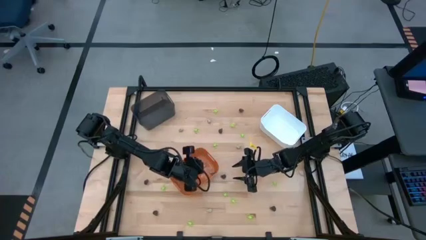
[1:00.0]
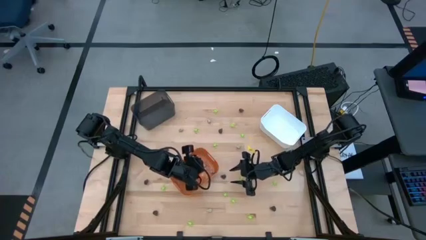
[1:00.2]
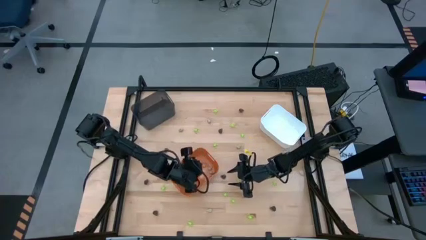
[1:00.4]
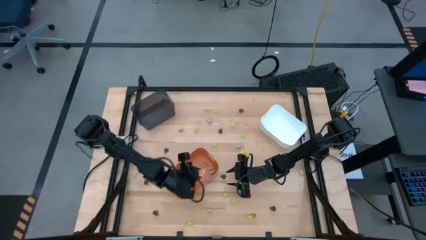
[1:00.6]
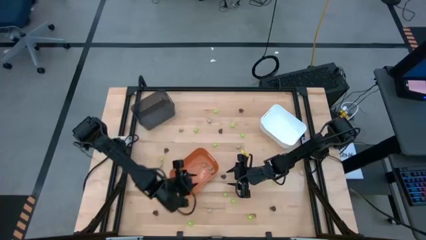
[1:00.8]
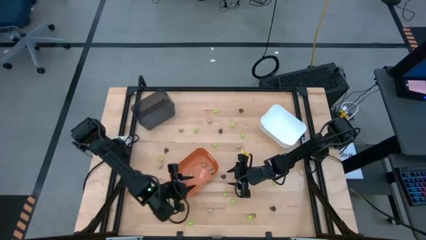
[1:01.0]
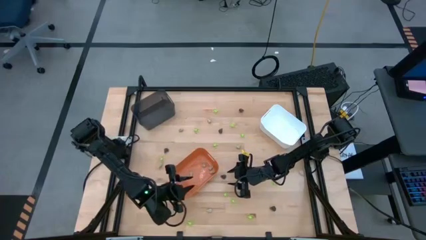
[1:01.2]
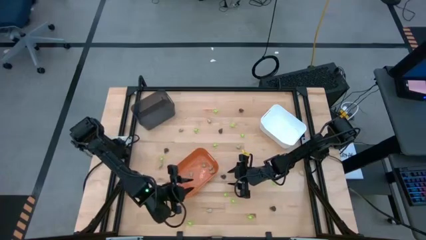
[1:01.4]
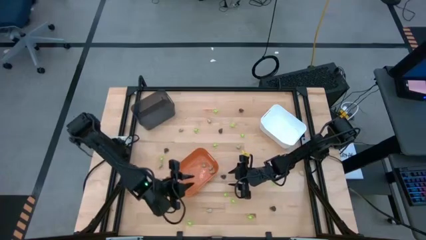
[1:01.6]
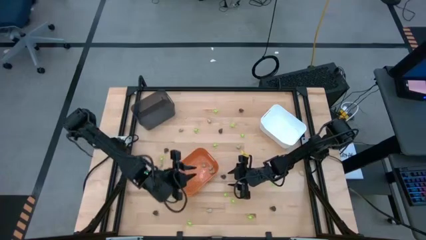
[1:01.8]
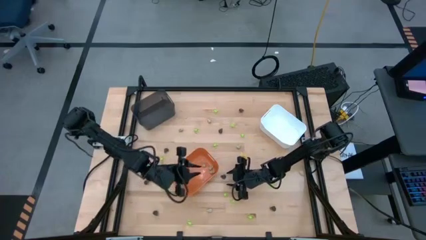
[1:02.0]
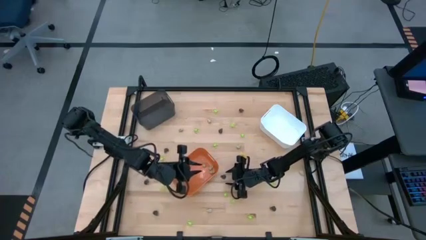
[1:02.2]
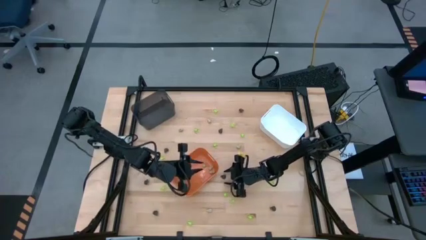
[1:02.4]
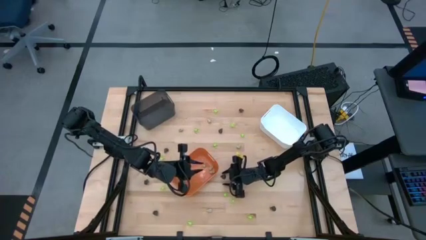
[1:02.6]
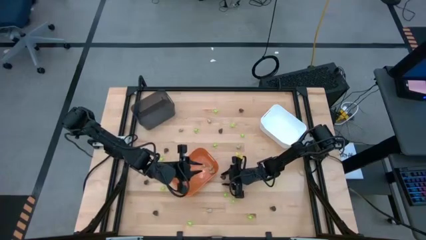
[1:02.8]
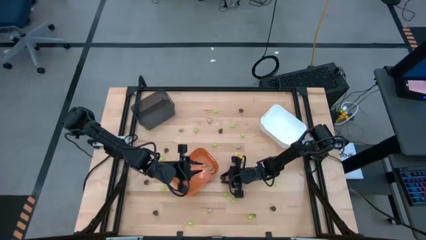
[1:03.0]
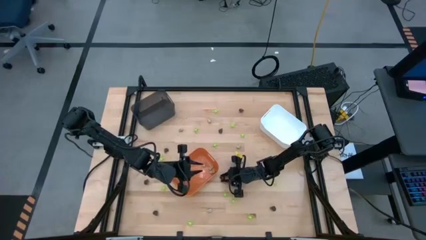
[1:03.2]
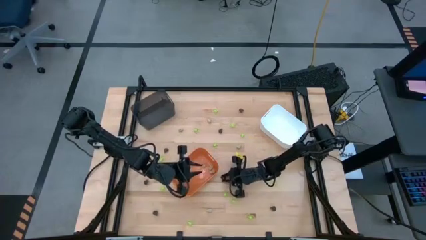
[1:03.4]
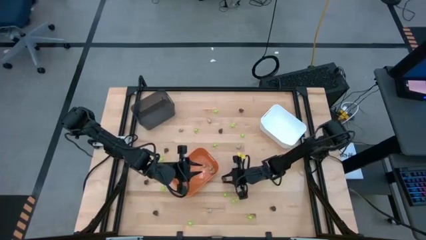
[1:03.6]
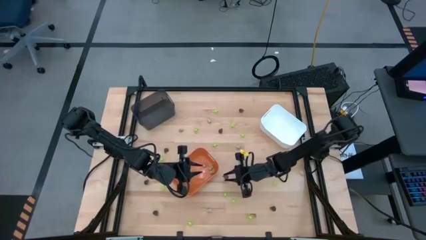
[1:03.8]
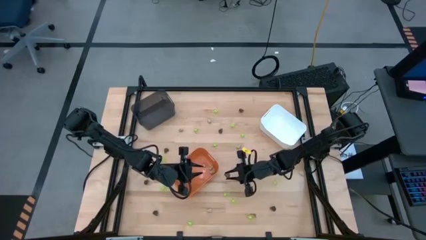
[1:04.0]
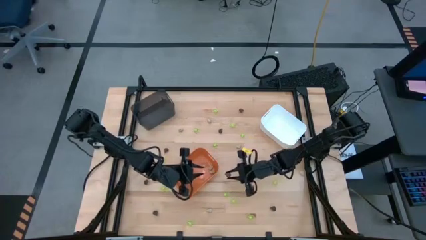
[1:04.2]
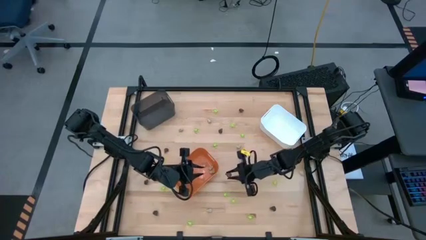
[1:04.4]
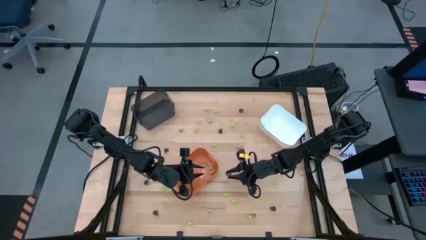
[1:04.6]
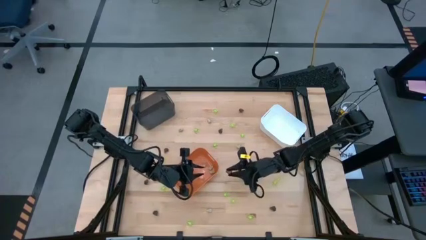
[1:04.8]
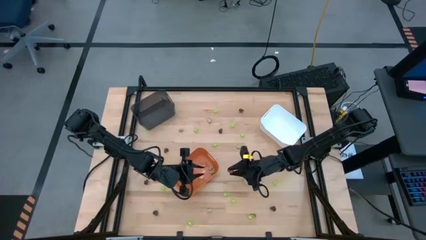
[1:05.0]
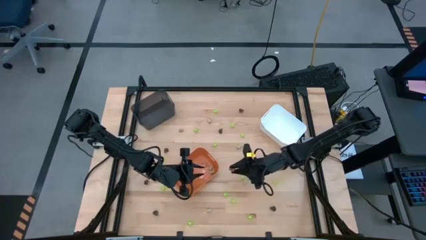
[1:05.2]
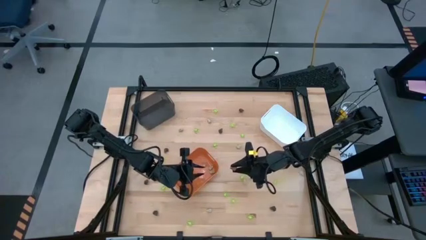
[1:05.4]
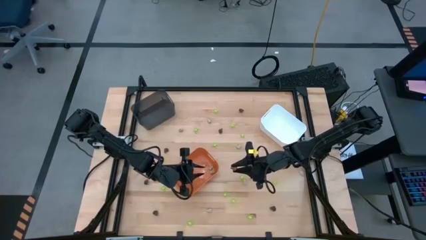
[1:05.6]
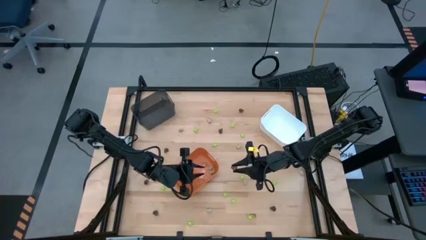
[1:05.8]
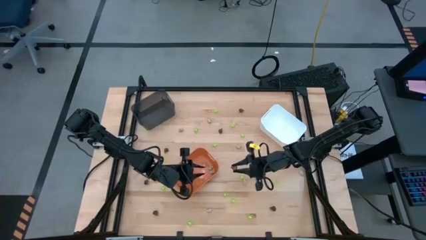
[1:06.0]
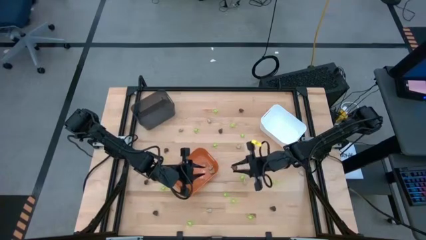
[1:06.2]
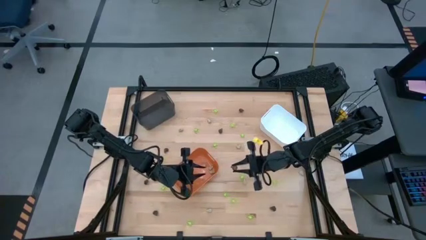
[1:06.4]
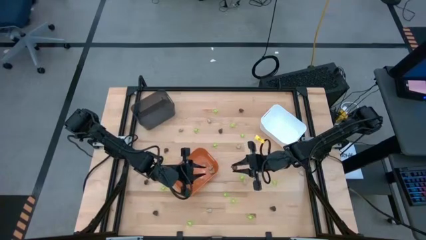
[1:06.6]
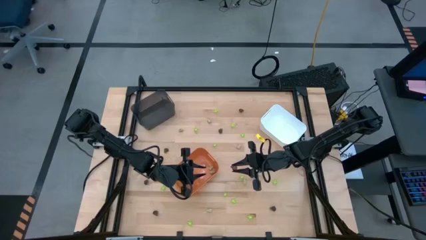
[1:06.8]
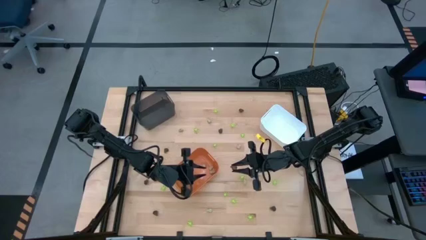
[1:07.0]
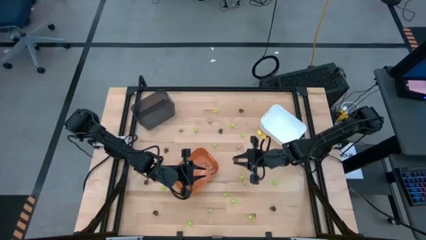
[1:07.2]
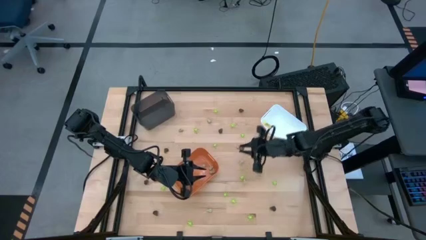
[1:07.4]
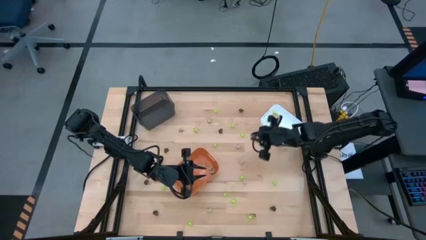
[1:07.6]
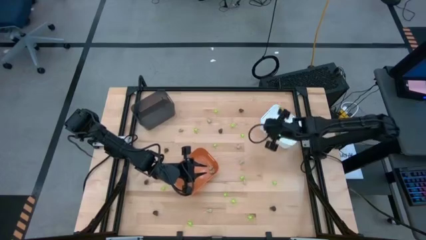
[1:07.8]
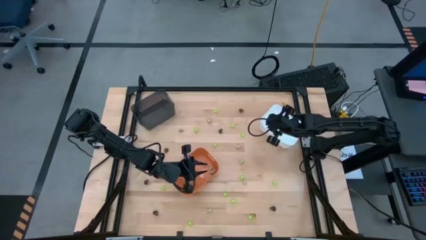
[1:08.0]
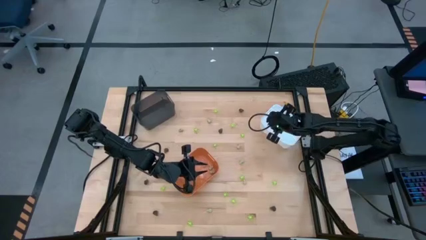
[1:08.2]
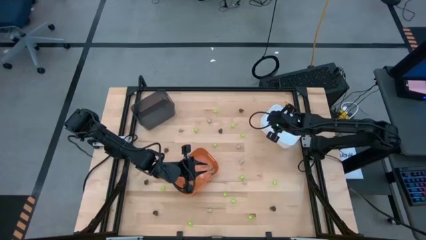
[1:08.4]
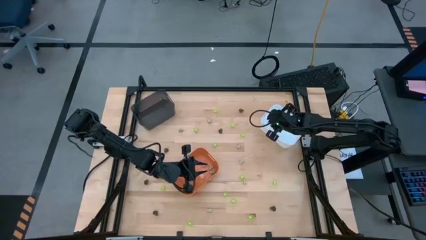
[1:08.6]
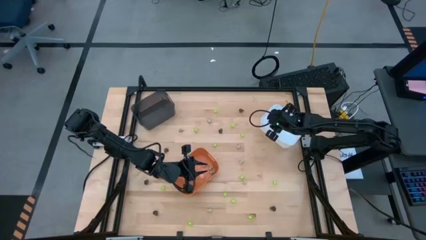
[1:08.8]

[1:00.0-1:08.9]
Task: Sort Halloween decoration
Put the small transparent skull toy into the white bin

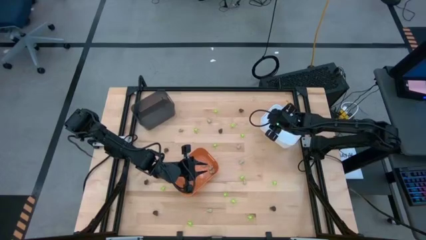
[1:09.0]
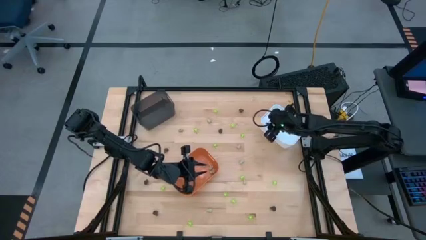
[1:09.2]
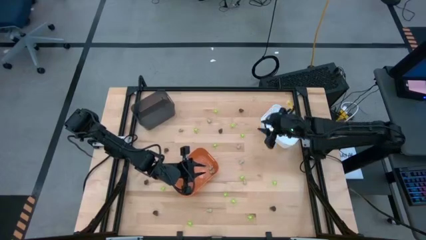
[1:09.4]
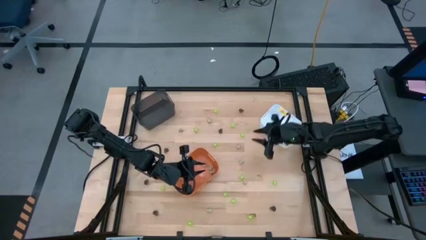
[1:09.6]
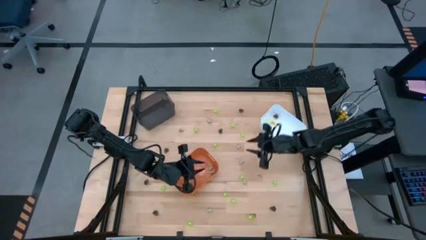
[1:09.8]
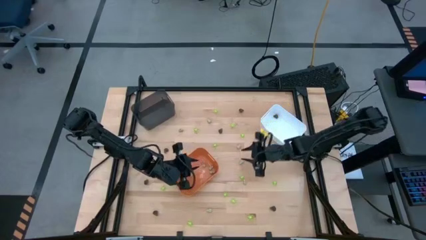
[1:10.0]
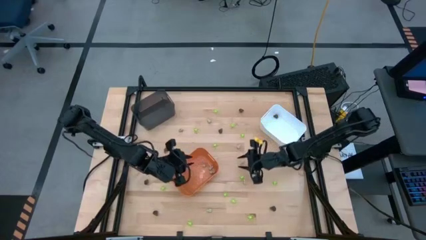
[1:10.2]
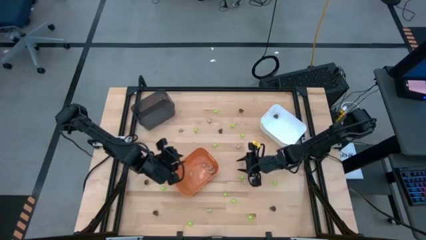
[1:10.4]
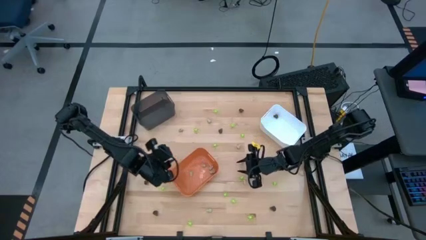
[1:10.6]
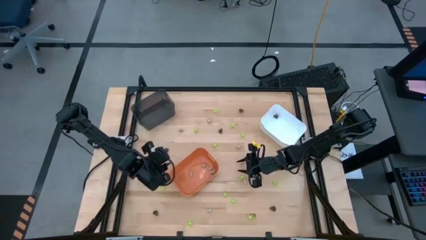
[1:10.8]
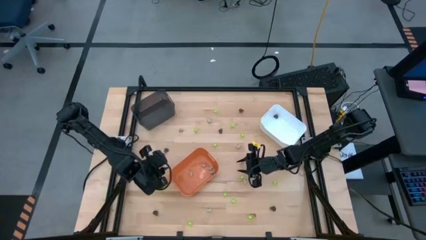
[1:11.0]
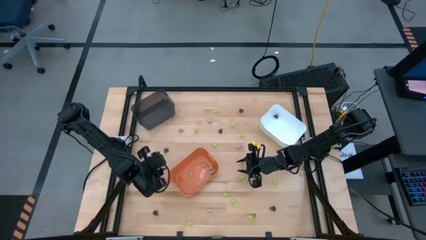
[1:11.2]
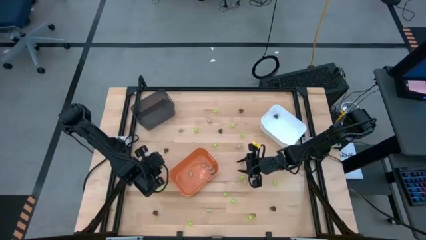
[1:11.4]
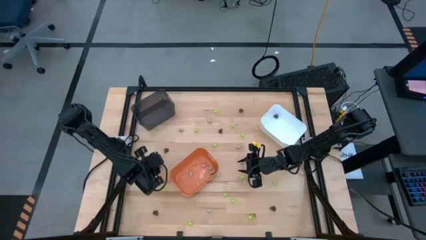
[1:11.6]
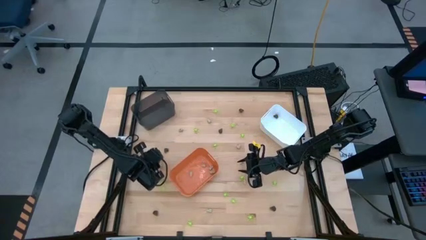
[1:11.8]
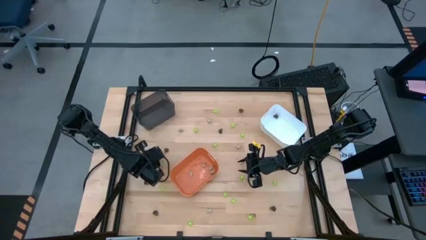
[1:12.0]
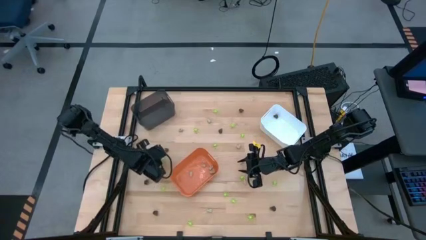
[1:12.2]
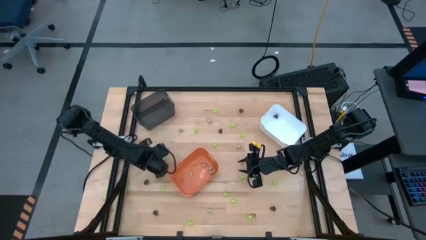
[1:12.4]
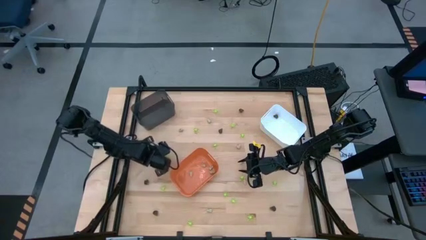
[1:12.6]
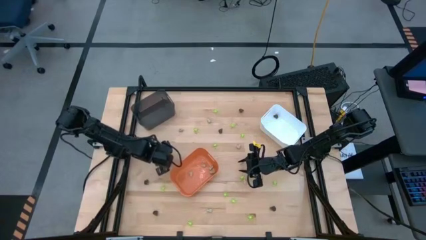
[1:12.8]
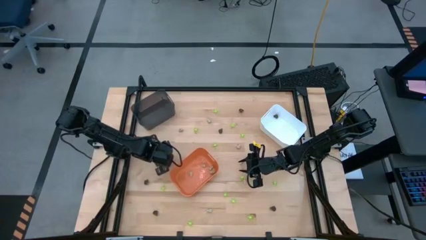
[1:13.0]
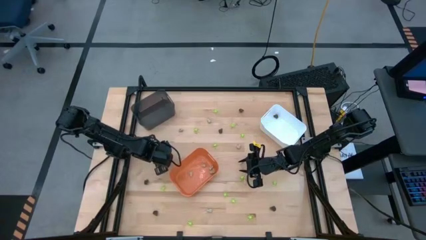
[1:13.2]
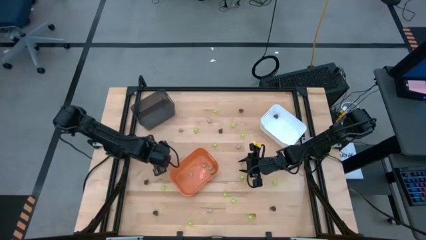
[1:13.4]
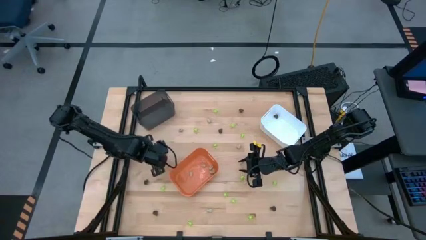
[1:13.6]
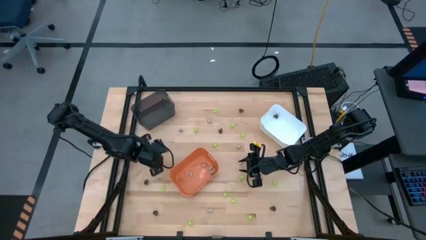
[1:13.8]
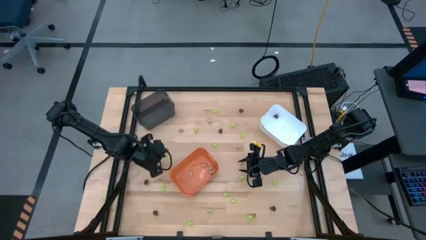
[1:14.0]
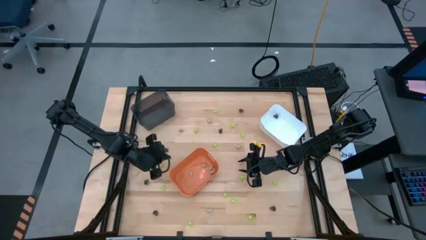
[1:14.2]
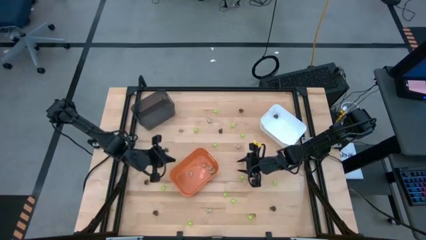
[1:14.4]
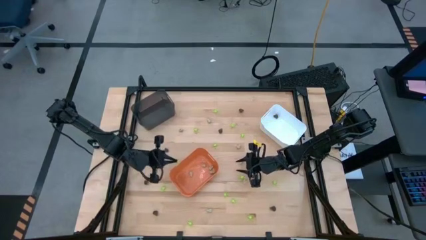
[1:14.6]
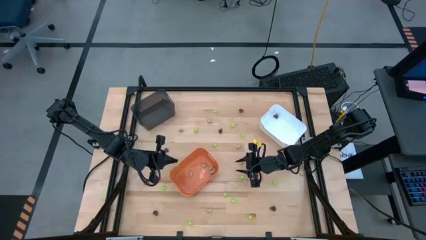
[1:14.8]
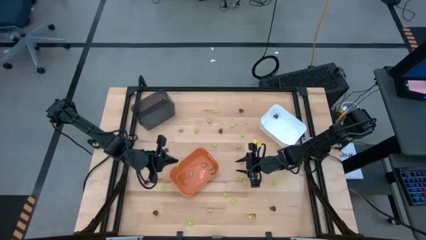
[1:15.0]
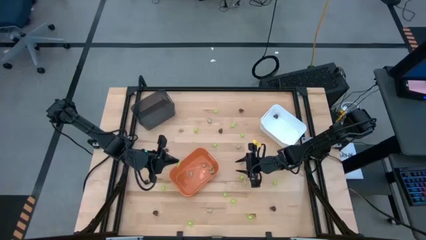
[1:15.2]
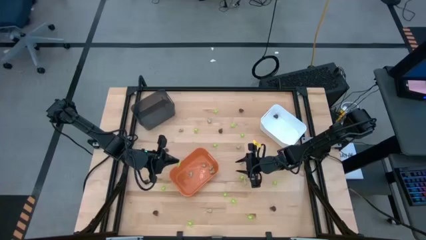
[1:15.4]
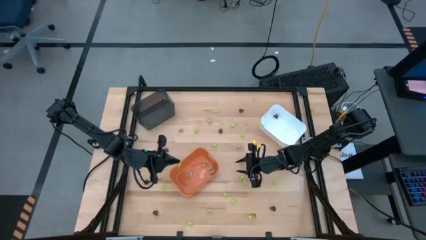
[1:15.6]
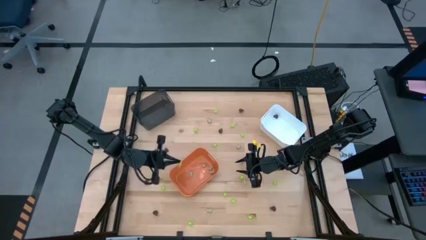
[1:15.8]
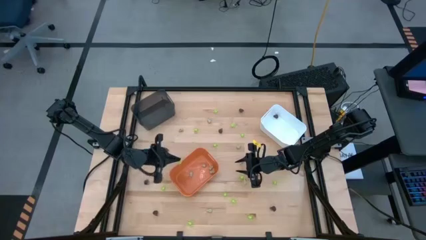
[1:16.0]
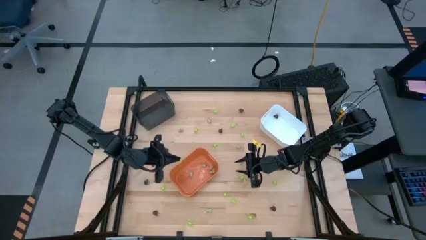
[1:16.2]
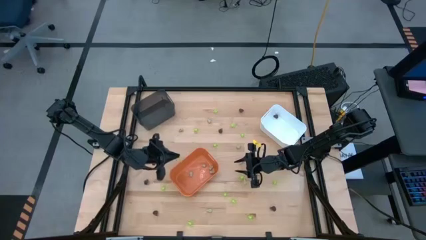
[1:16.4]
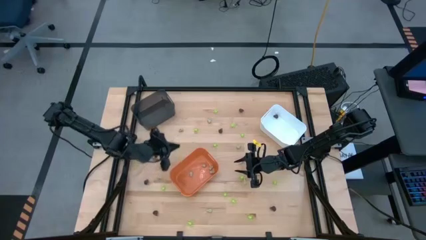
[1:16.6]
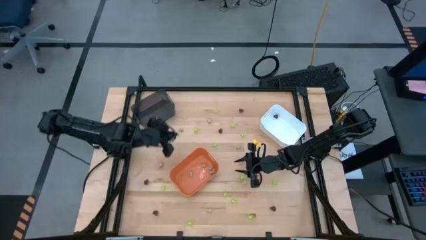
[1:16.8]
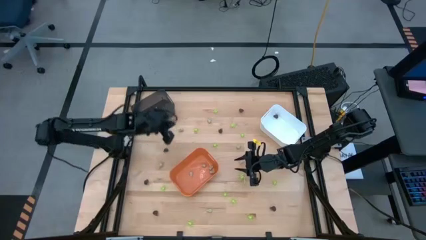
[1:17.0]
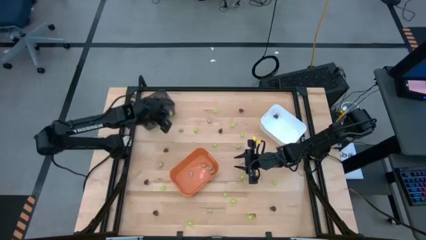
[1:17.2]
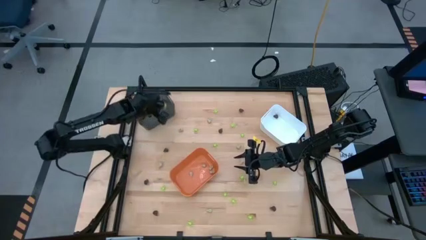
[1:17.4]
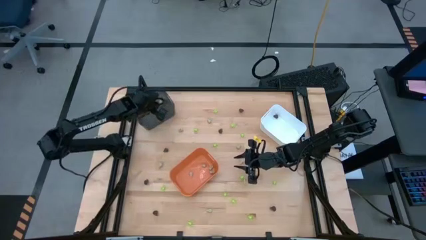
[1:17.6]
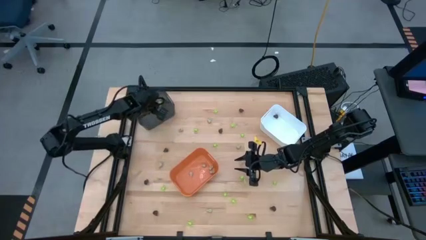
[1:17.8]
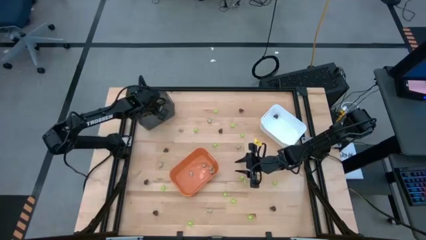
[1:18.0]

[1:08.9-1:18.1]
Put the green spider toy into the black bin
